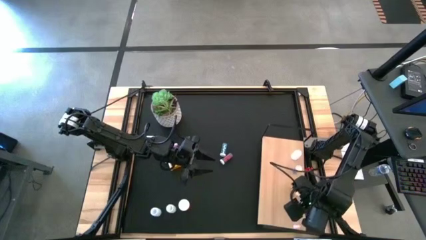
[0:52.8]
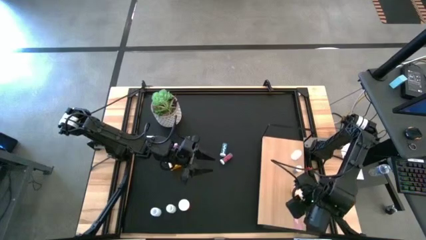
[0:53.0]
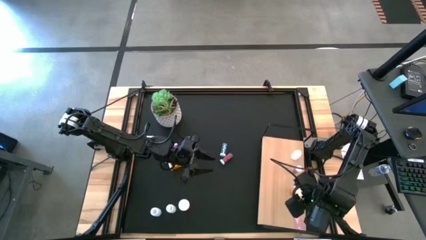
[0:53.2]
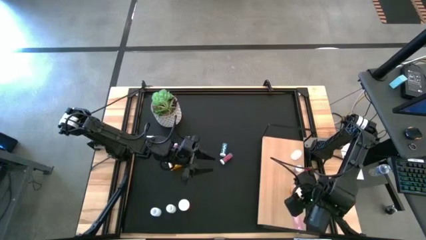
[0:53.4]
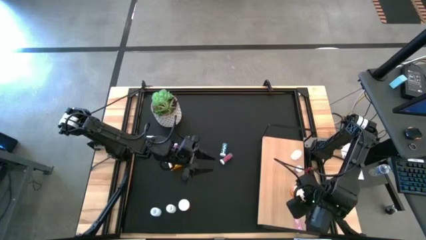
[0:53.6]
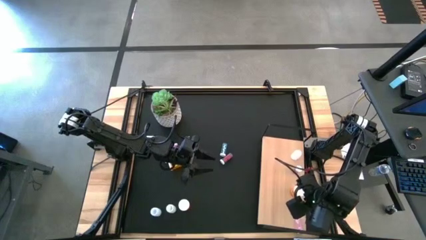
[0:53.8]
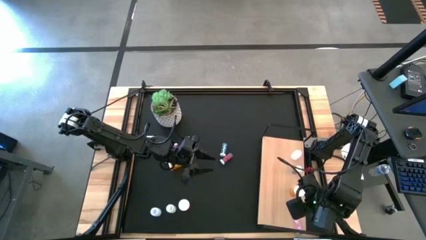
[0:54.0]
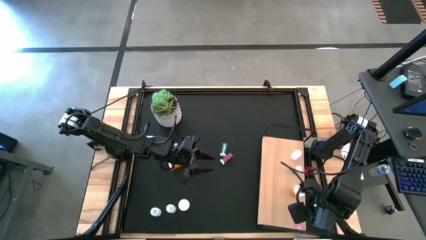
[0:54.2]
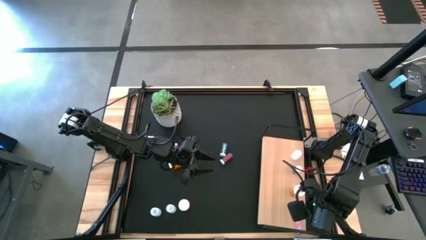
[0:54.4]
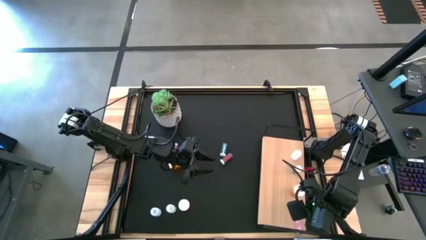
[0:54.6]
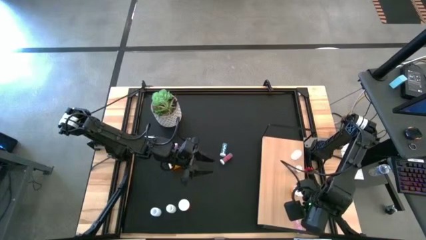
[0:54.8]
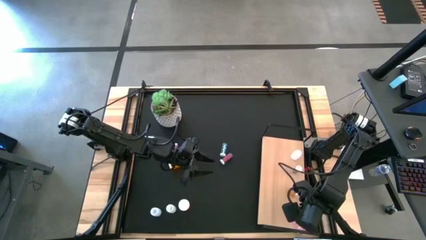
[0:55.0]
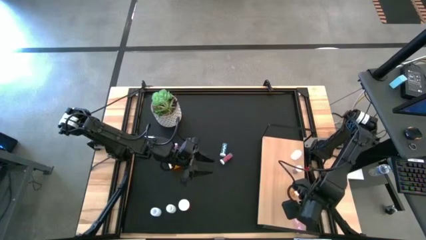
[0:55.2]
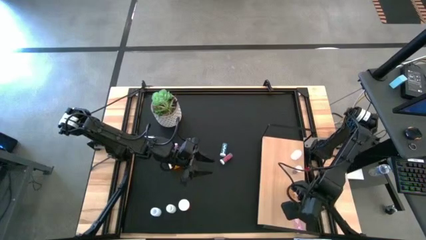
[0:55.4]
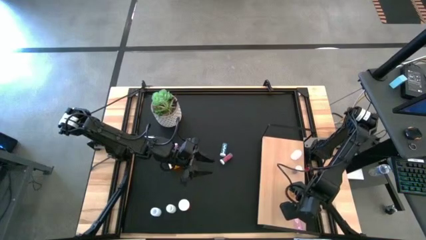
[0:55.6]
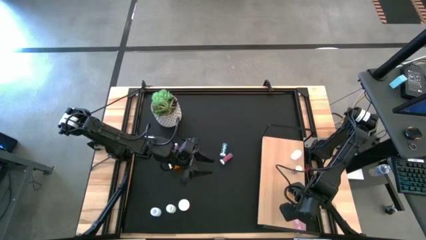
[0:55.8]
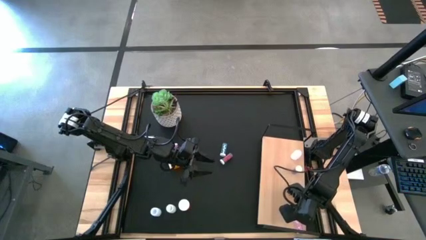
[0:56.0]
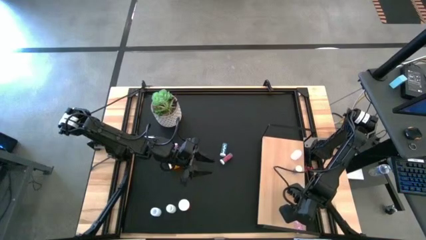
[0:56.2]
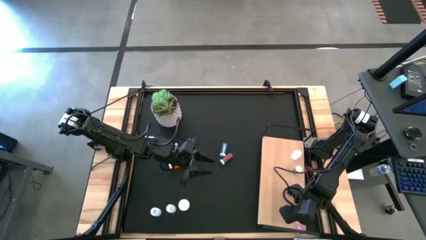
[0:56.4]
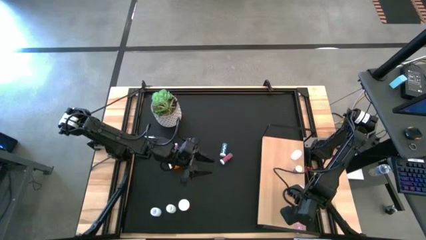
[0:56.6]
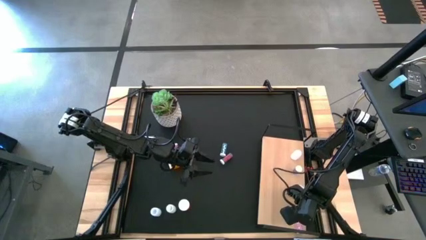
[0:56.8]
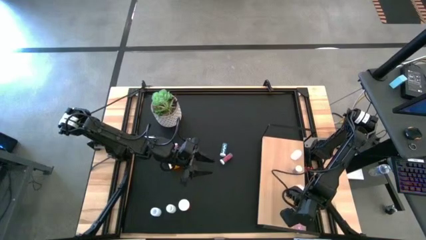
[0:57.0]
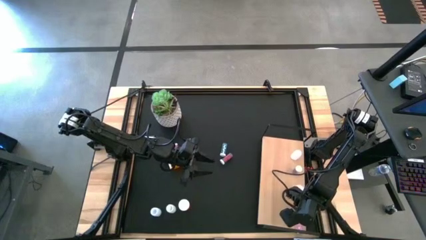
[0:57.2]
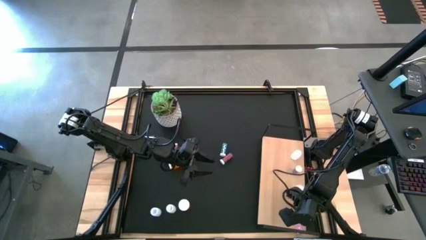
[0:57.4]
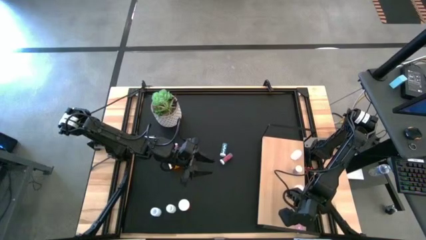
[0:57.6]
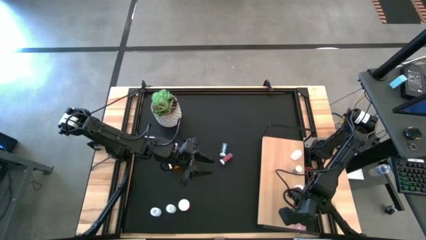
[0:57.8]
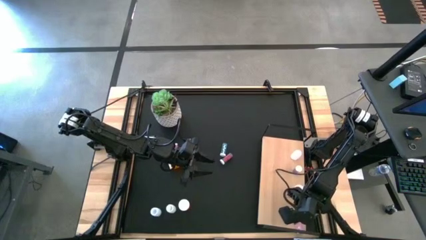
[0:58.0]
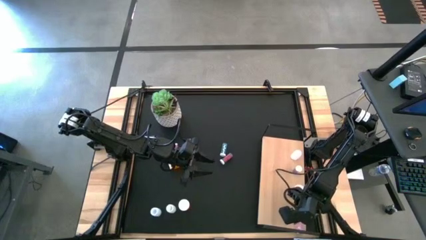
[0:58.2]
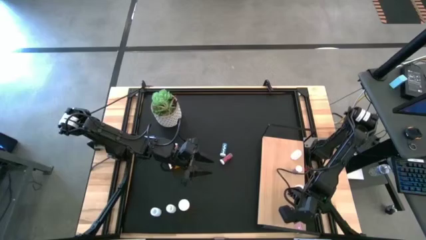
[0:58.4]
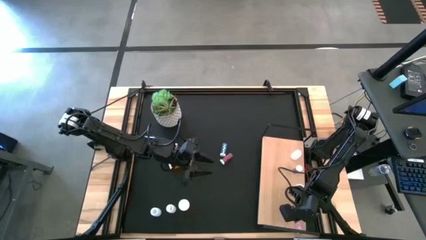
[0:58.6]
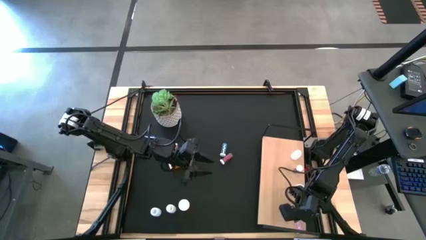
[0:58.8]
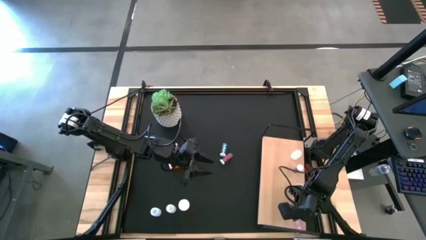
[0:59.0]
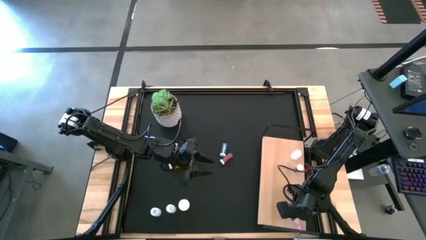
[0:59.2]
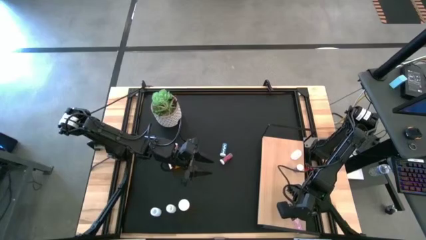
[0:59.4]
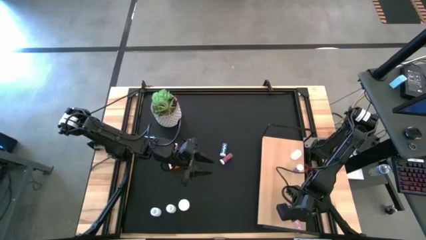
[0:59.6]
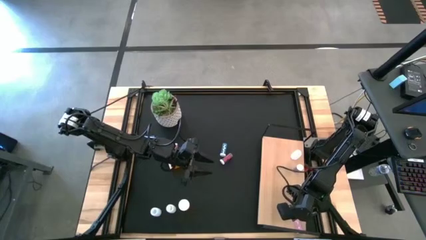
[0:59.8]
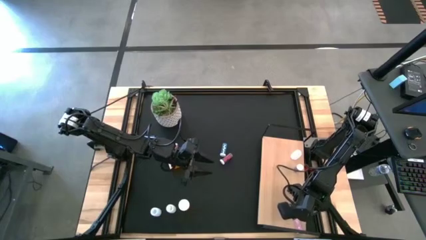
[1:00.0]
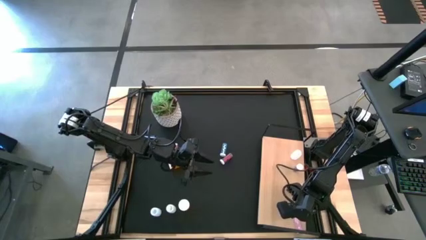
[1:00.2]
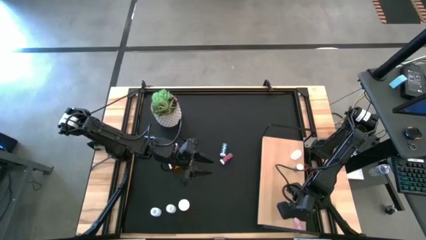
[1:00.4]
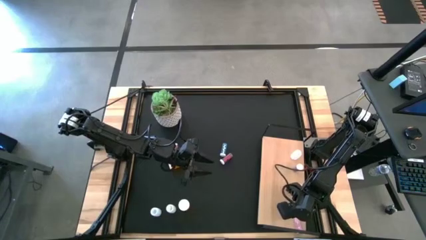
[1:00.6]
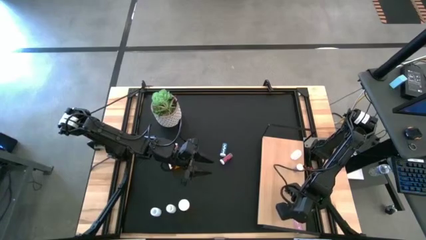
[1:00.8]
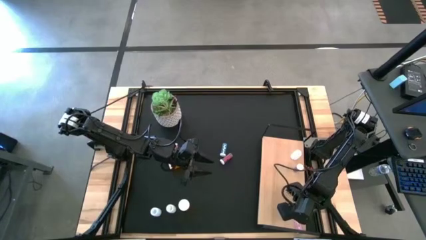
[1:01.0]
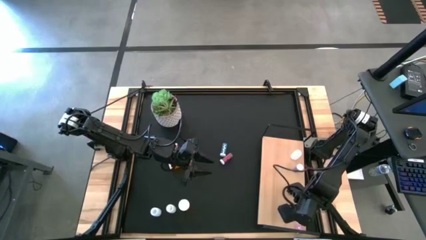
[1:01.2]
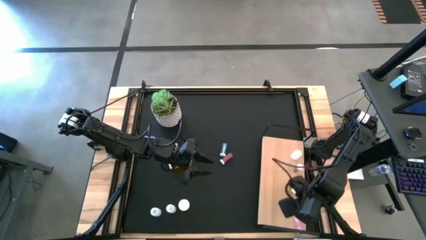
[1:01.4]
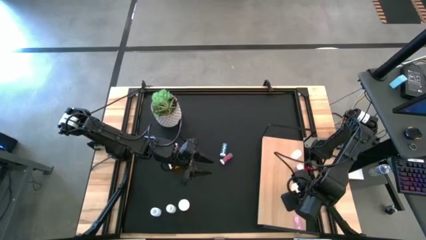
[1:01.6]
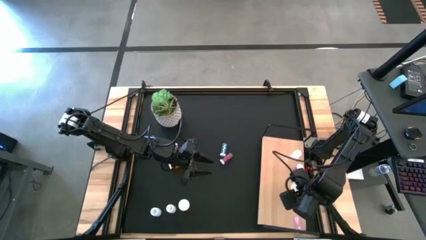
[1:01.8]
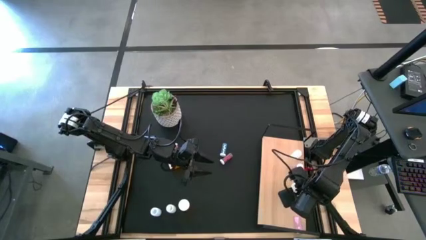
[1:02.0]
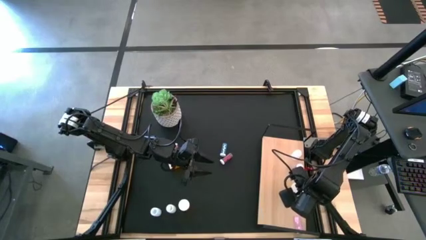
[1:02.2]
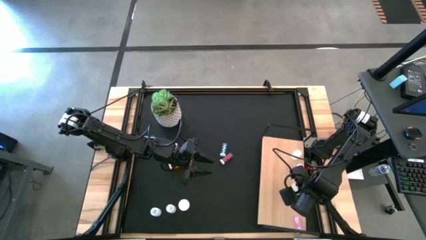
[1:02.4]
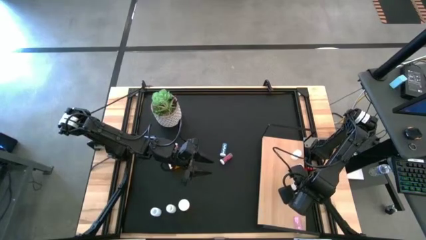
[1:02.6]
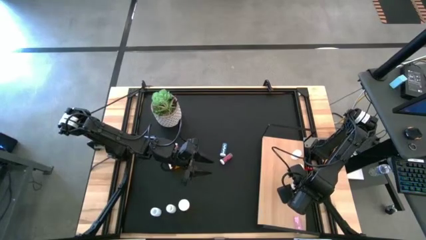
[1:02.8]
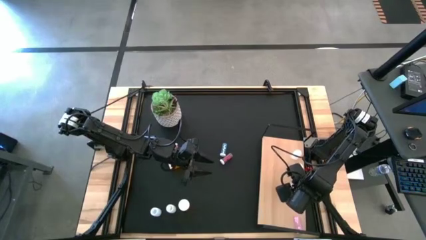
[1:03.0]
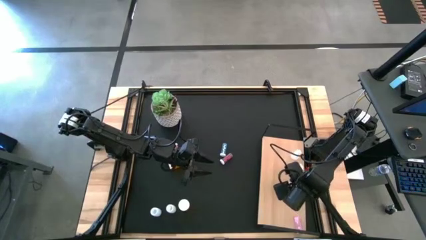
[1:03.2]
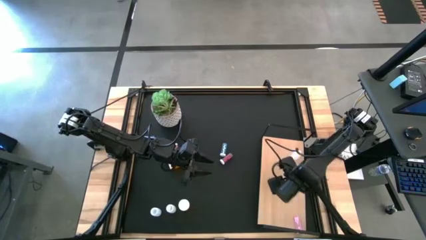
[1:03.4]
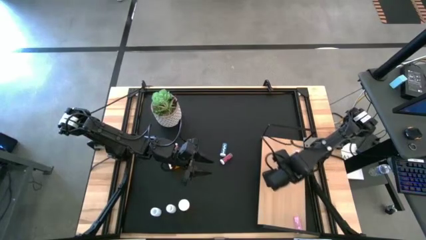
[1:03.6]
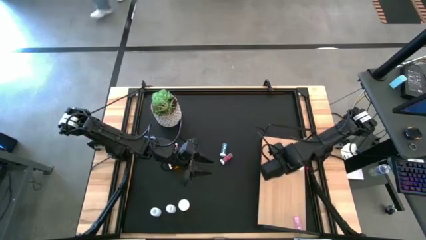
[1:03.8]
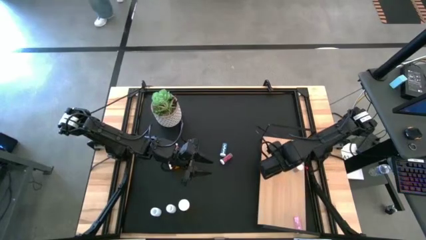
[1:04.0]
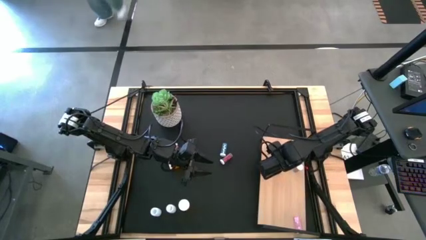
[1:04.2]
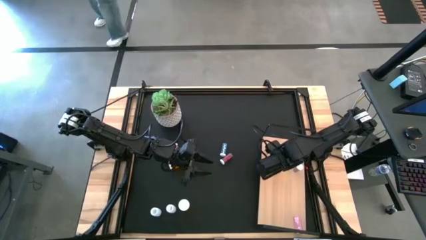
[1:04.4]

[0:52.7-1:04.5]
Task: Pick and place medicine bottles onto shelf by color
Adjust the orange pill bottle on the shelf

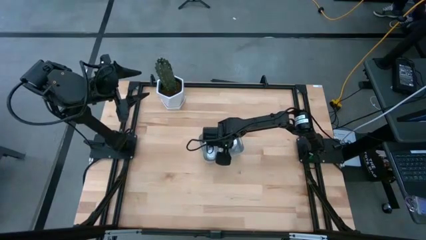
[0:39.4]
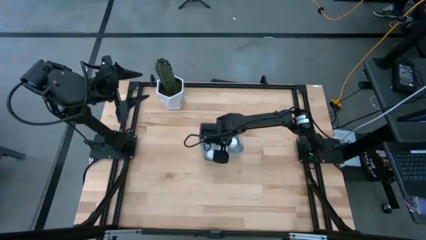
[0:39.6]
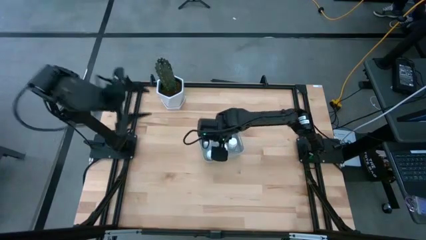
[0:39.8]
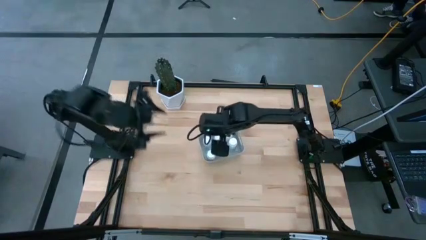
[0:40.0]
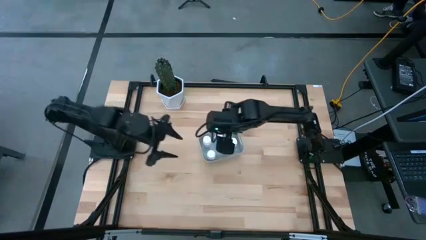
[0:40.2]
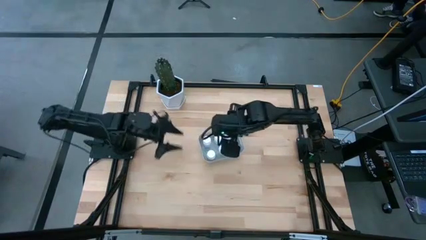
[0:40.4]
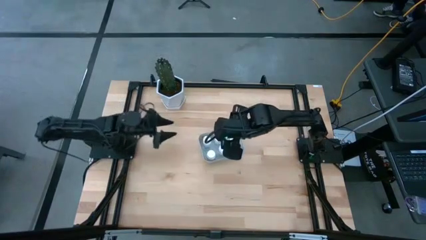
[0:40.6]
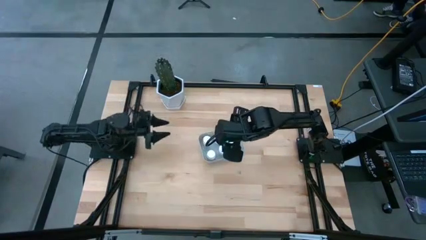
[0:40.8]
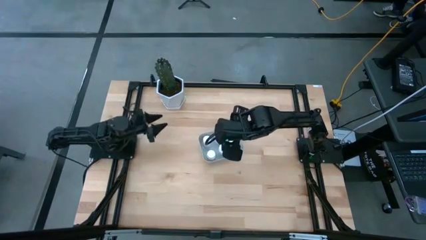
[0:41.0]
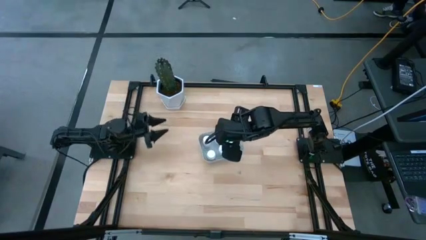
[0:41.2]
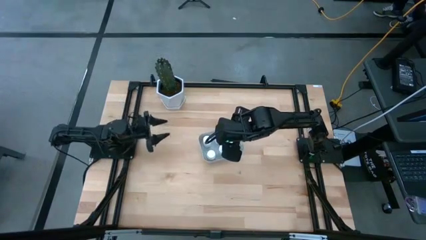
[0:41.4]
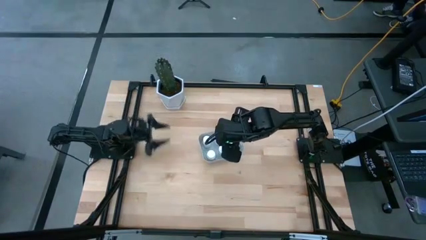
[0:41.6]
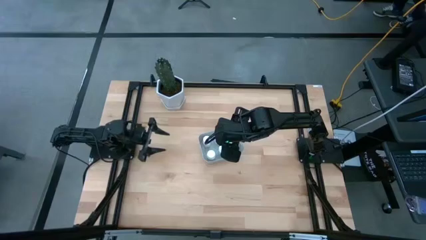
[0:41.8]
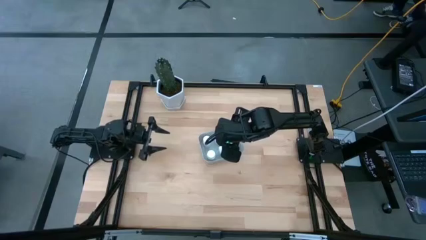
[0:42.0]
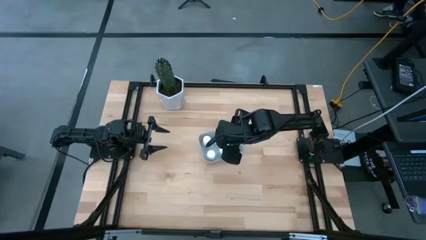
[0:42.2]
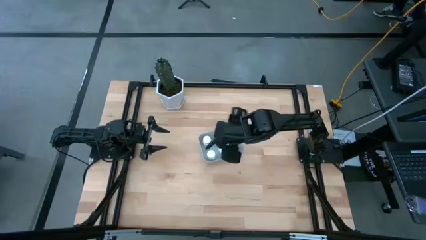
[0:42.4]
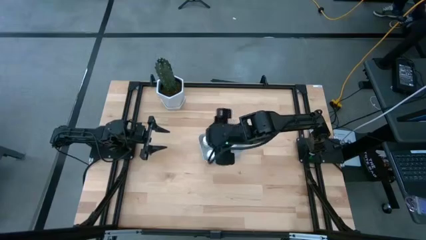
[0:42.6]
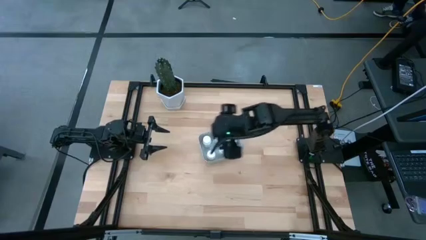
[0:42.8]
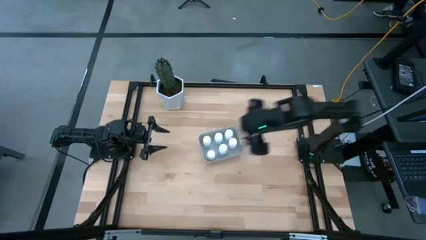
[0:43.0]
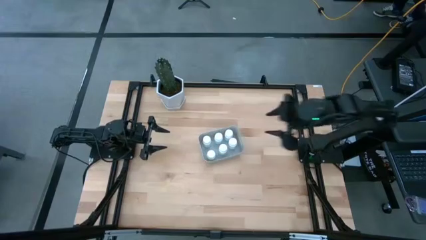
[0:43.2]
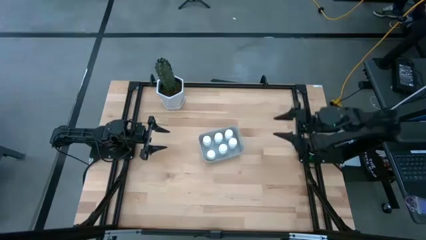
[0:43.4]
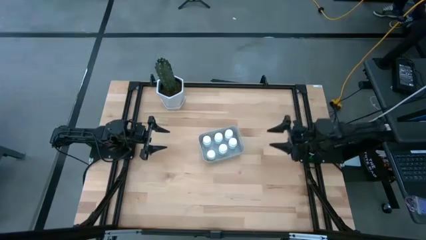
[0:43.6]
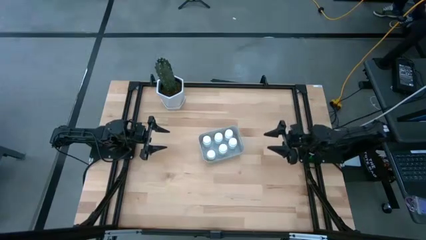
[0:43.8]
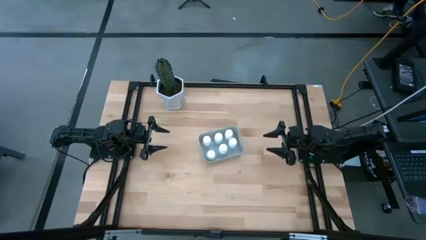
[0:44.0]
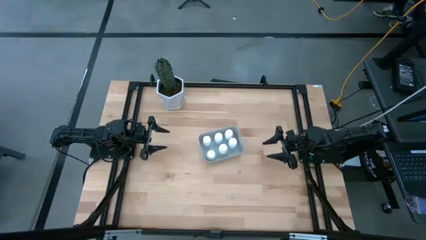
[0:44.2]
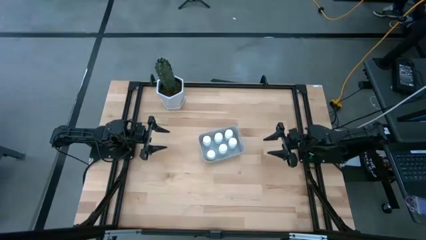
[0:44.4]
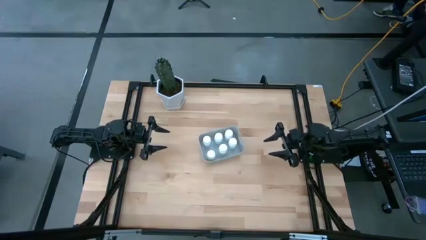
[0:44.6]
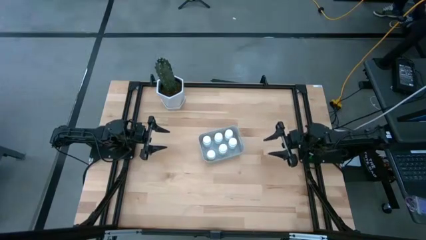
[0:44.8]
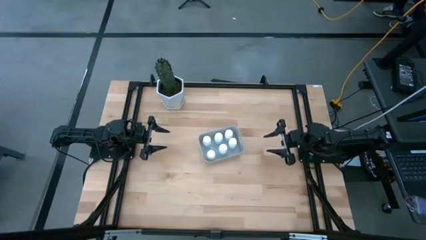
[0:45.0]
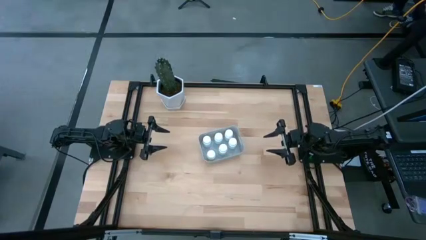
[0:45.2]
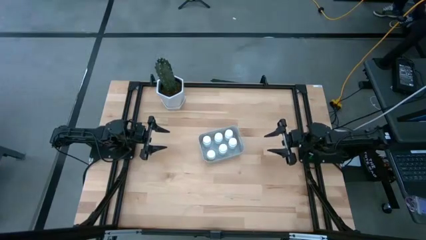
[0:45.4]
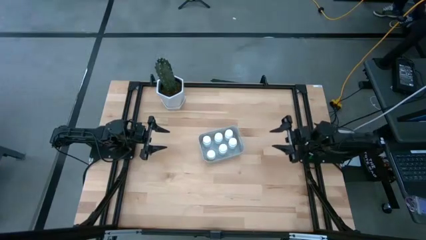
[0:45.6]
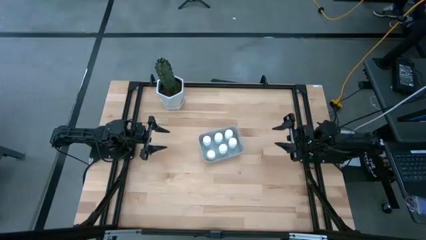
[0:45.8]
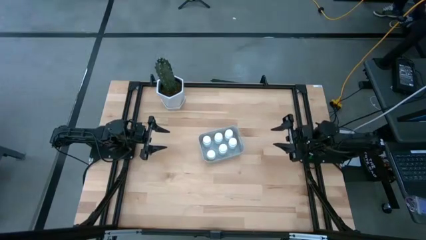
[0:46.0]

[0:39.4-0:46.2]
Task: Pick and place pill bottles into a basket
Return to Home Position
